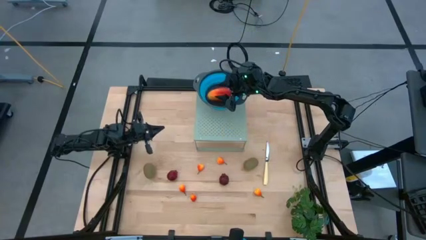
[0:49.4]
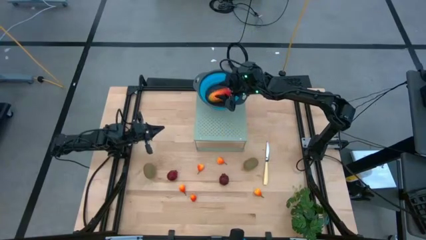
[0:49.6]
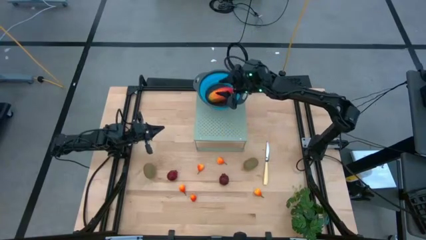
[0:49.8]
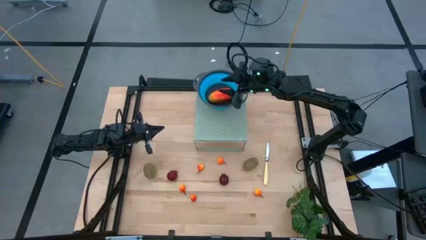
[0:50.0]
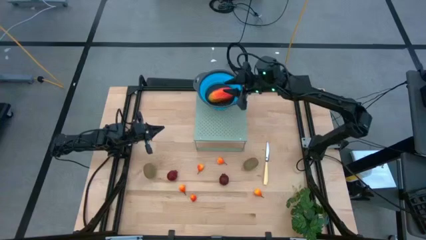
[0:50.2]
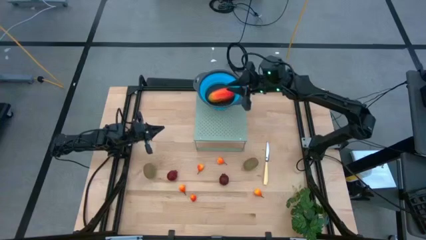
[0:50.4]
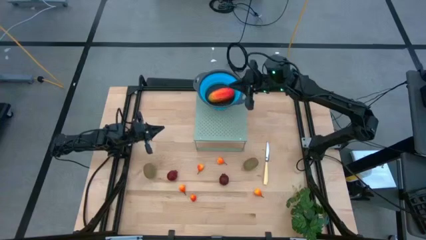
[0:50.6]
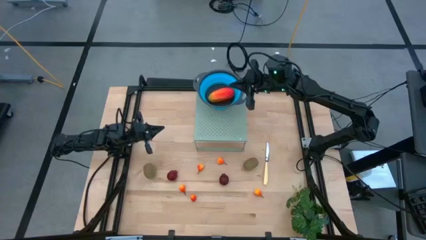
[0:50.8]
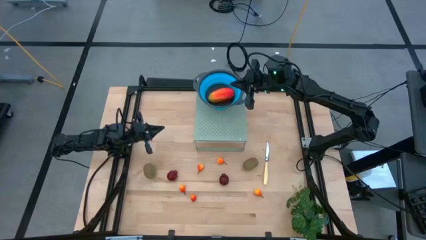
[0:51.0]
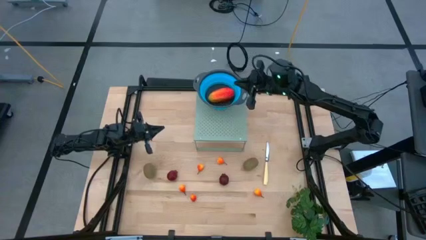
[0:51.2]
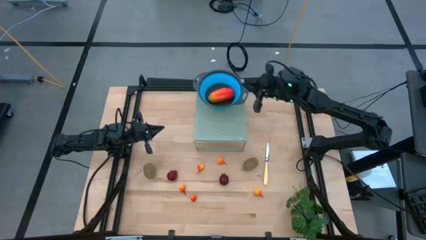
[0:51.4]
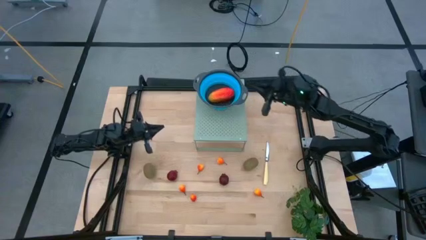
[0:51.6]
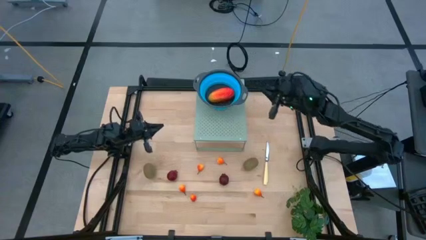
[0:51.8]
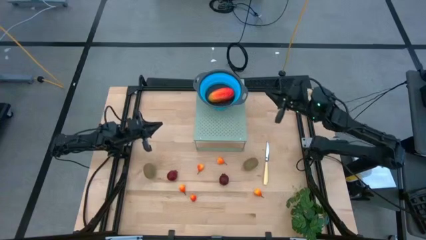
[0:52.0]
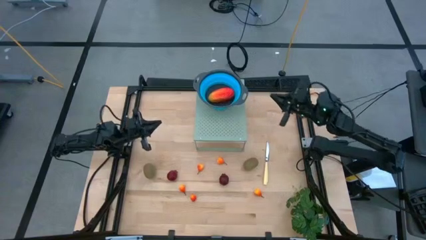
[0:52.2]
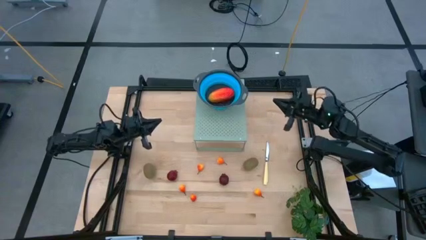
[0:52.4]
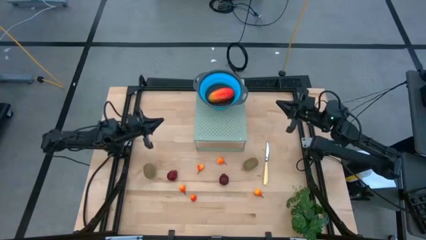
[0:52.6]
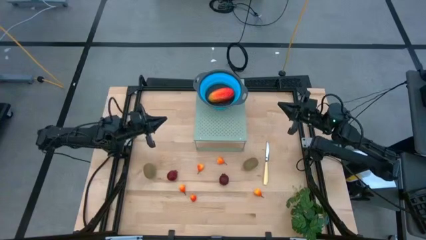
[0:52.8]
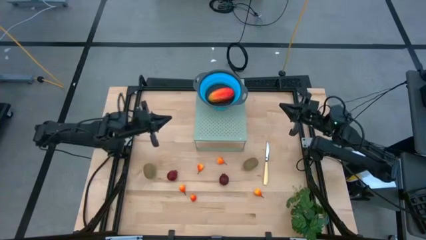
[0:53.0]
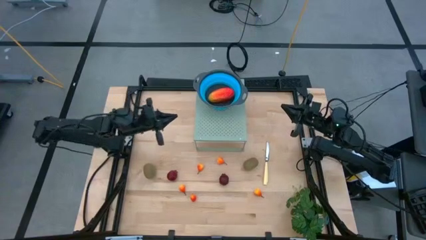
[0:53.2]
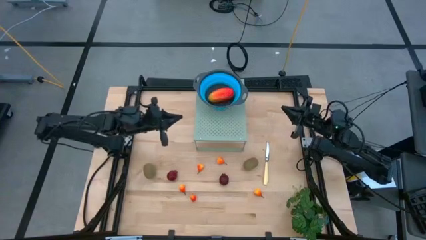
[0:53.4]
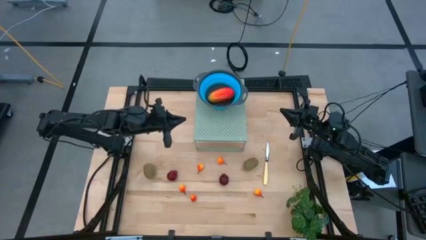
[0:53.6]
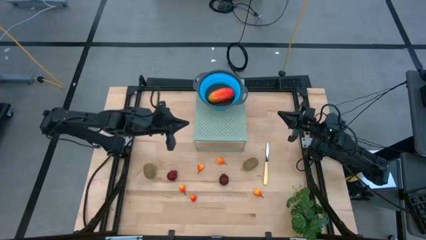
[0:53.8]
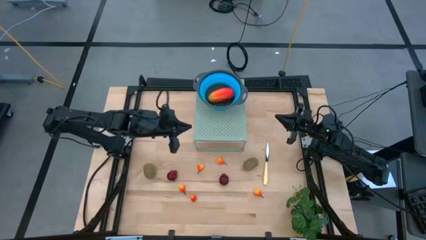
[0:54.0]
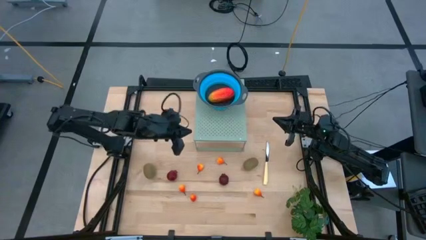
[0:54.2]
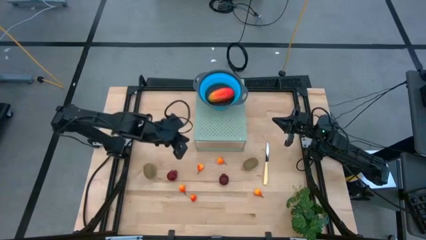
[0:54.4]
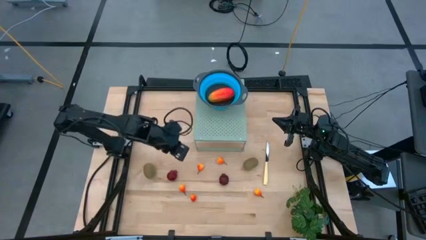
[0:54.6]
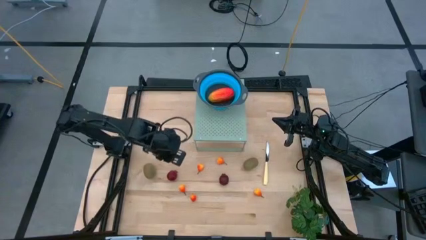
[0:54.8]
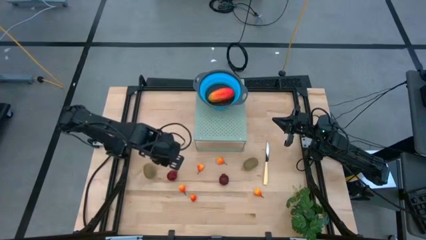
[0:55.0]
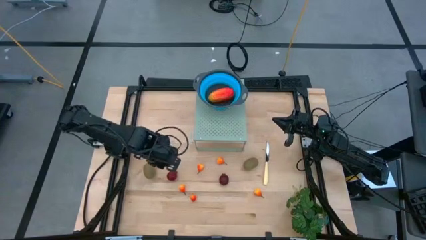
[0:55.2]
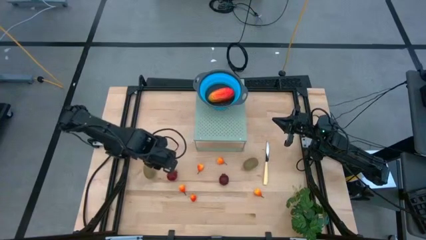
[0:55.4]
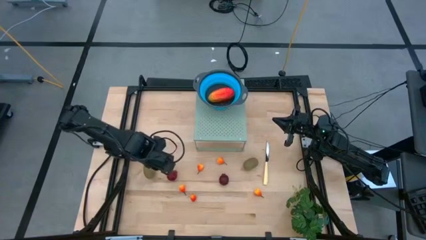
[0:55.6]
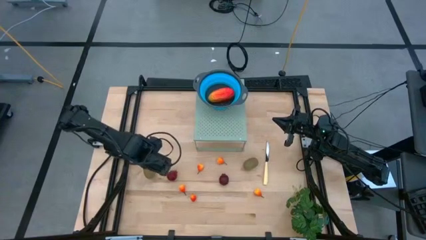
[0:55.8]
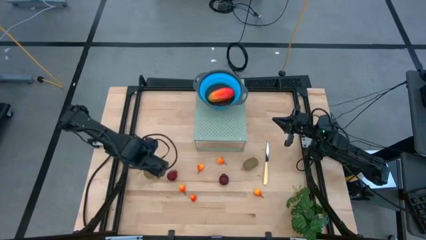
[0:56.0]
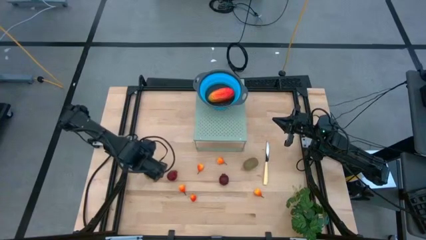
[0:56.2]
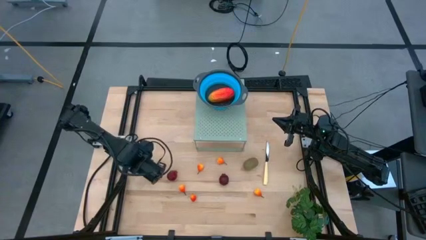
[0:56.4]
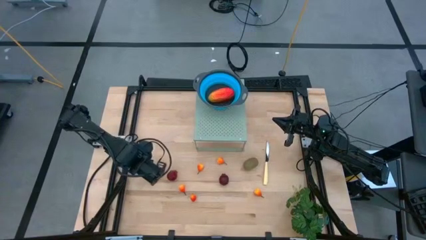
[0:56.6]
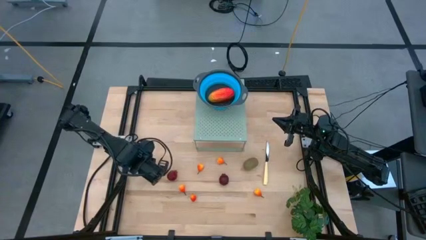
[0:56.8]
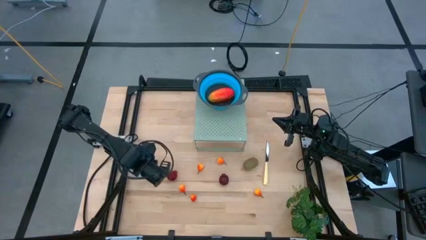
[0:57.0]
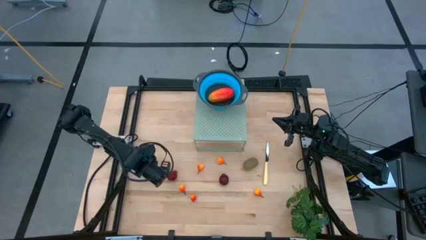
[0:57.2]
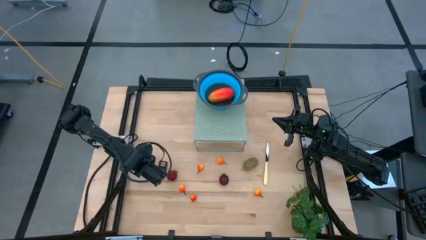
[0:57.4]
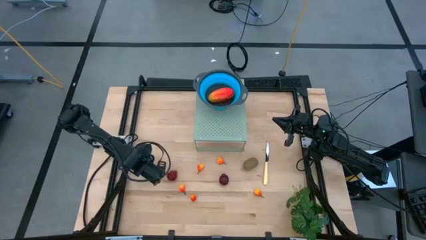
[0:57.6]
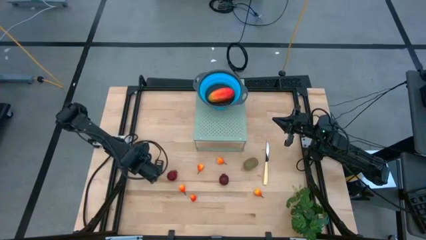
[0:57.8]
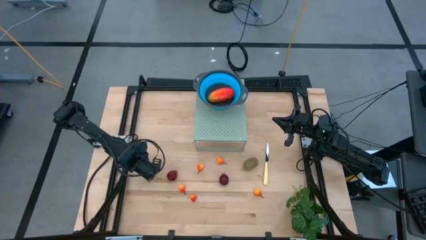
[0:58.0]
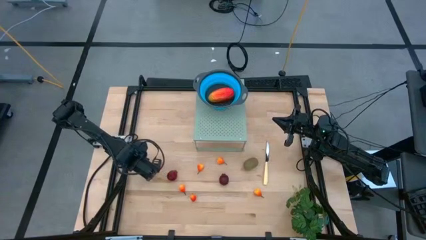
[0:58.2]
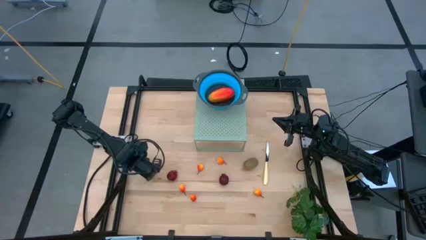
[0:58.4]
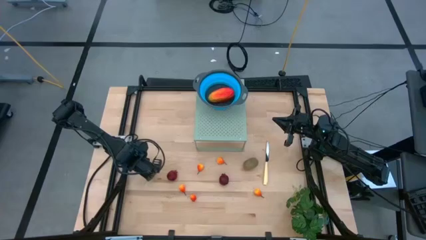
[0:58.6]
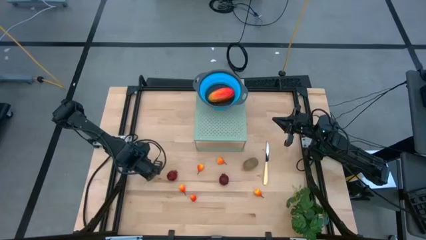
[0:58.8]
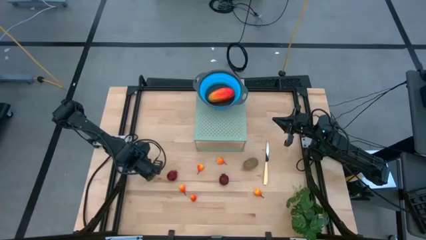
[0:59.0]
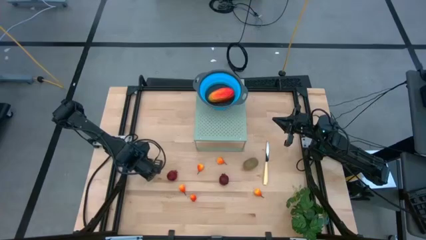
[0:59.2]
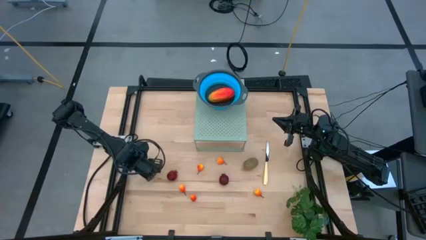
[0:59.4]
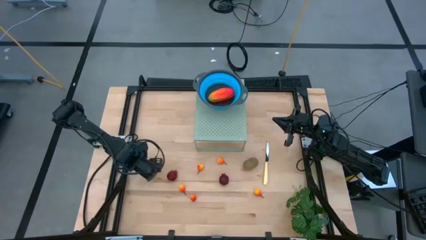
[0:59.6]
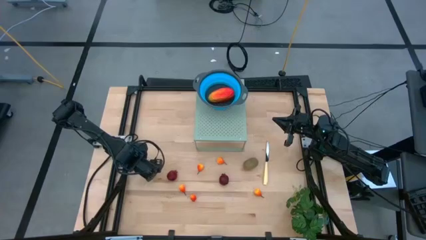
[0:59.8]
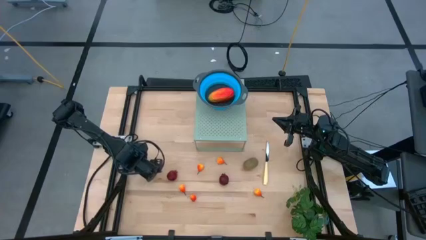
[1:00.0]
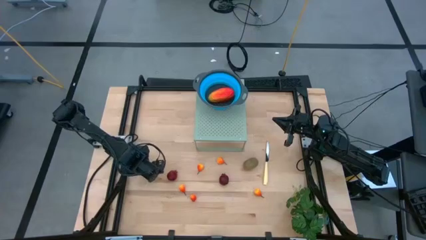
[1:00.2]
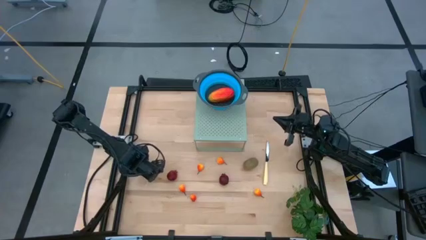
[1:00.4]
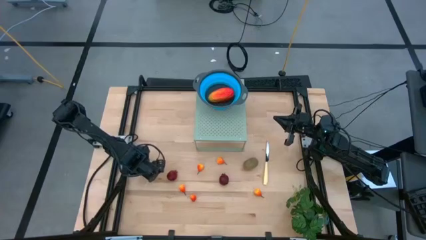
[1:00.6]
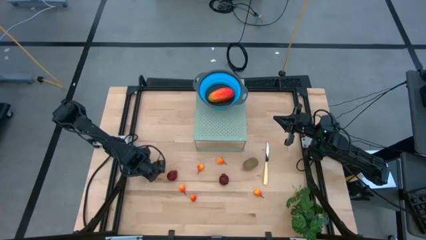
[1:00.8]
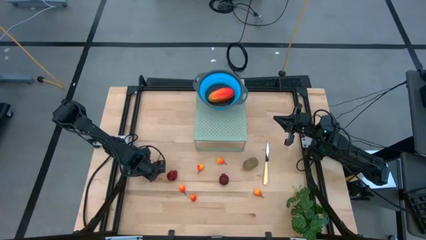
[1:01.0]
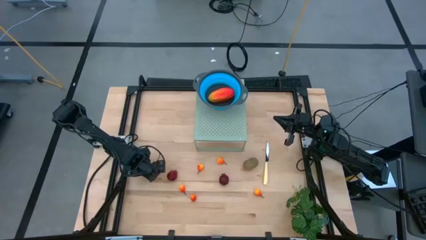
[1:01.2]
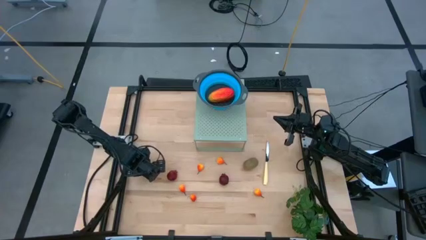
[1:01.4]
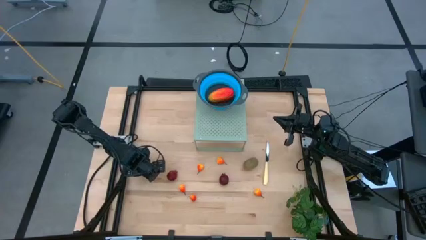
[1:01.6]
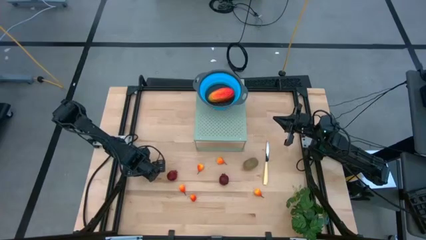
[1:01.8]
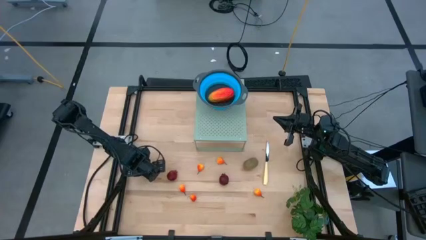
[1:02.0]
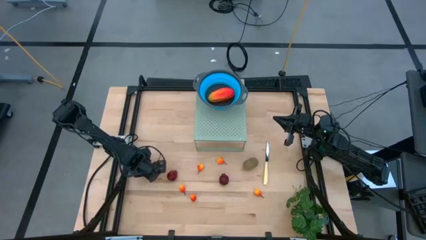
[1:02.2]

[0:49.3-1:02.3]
Task: Pick & Place Fruit
Put the kiwi into the blue strainer bowl on the shelf
